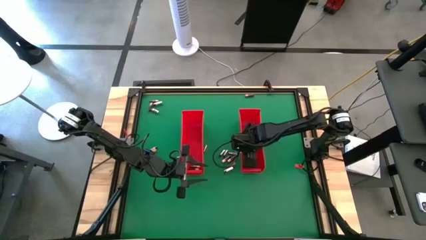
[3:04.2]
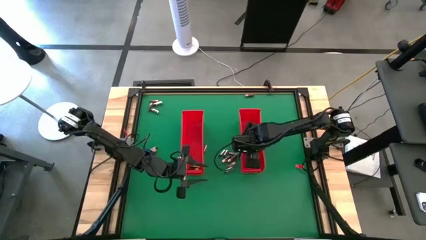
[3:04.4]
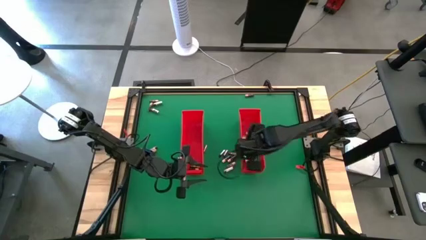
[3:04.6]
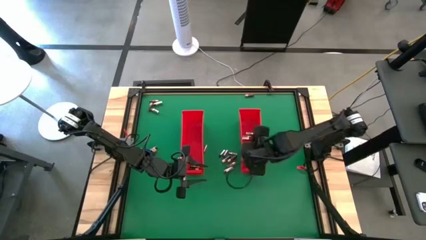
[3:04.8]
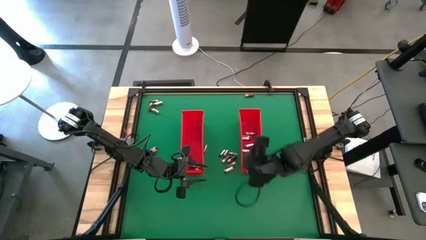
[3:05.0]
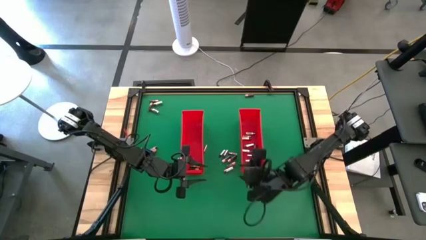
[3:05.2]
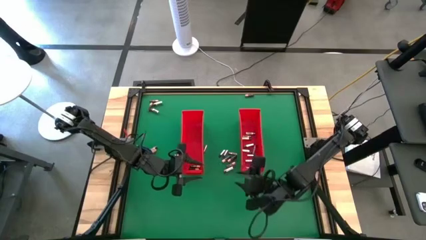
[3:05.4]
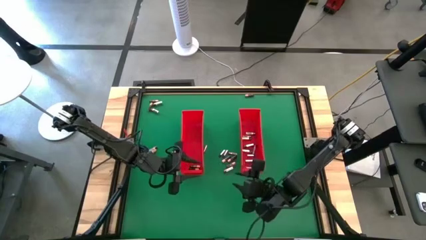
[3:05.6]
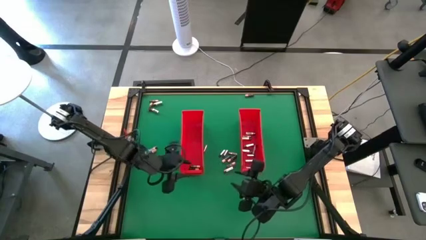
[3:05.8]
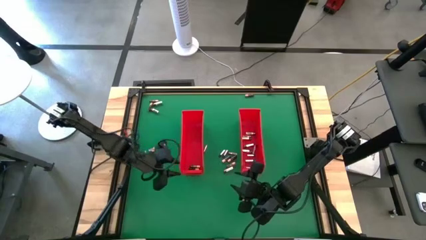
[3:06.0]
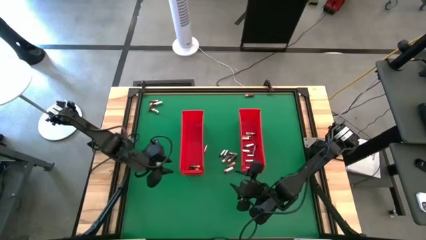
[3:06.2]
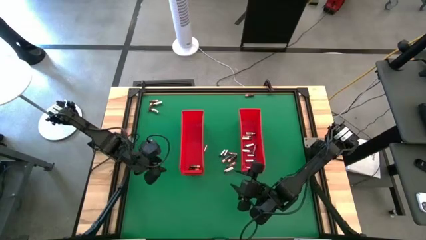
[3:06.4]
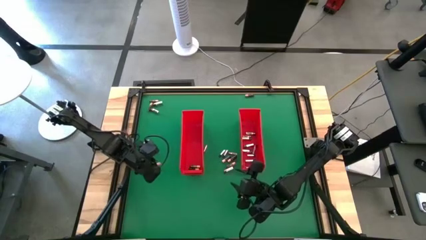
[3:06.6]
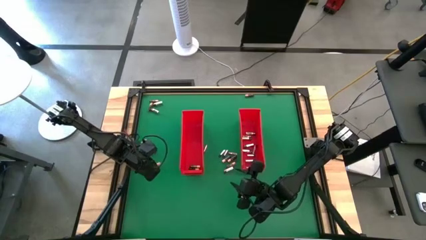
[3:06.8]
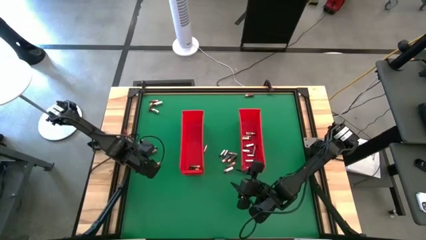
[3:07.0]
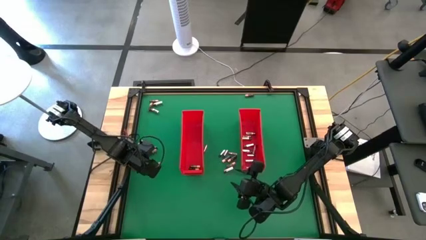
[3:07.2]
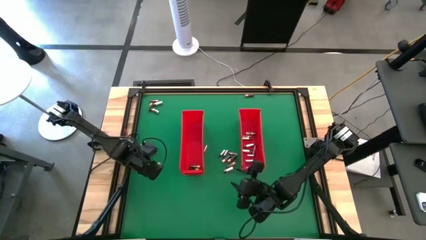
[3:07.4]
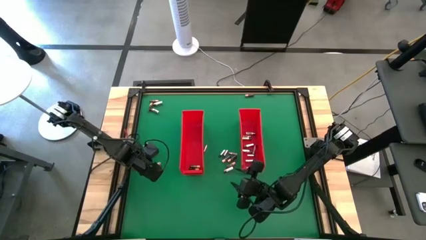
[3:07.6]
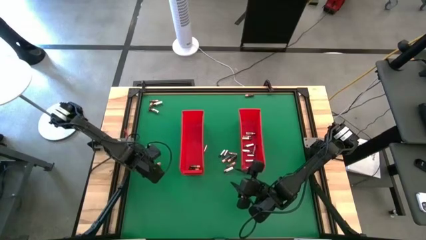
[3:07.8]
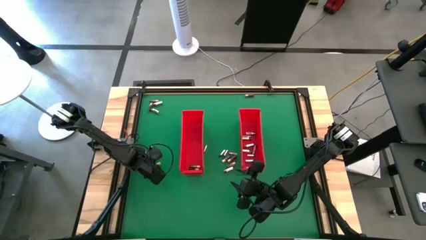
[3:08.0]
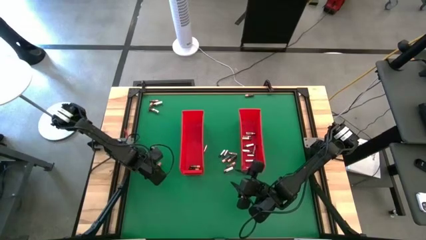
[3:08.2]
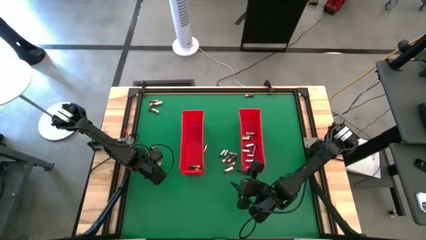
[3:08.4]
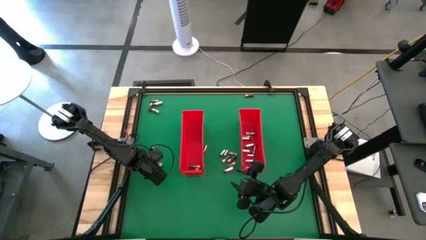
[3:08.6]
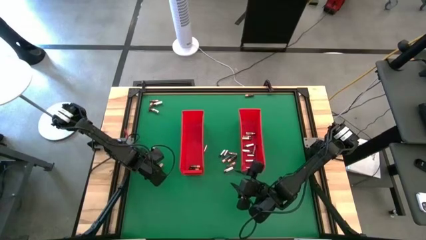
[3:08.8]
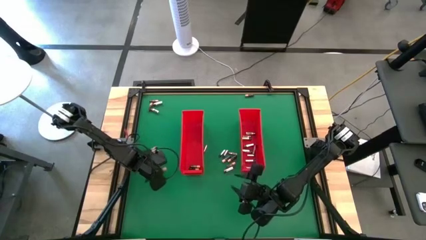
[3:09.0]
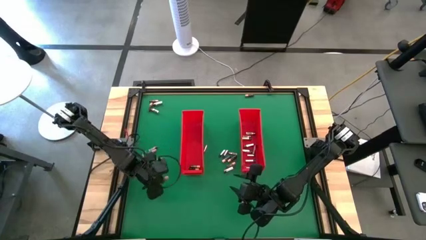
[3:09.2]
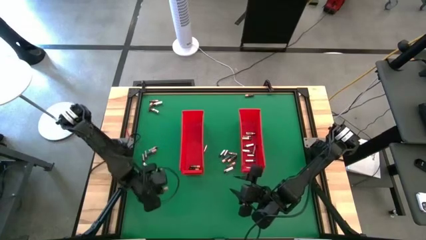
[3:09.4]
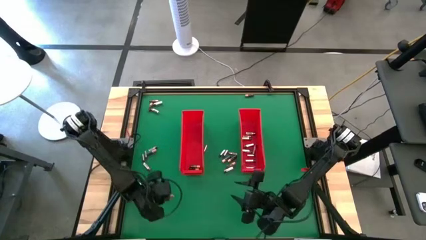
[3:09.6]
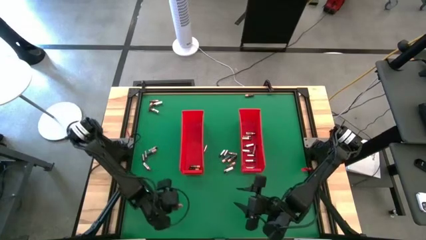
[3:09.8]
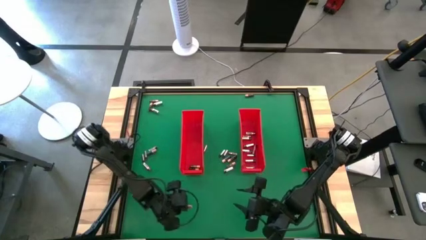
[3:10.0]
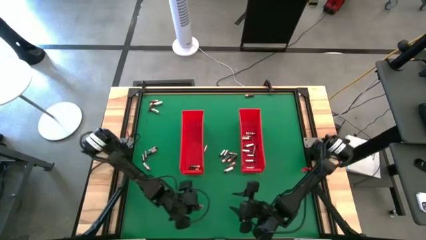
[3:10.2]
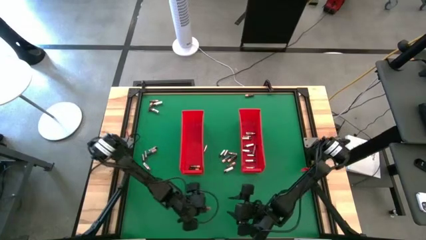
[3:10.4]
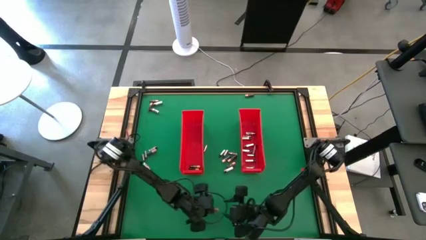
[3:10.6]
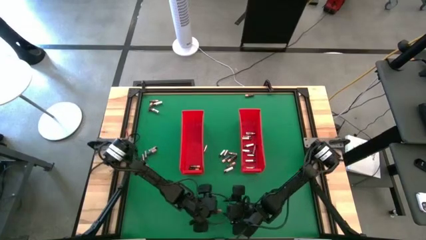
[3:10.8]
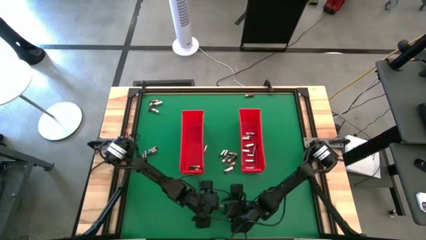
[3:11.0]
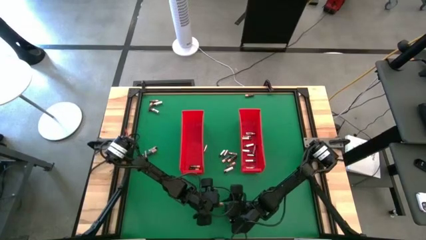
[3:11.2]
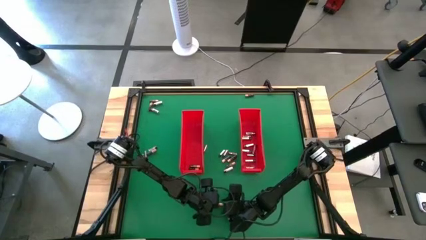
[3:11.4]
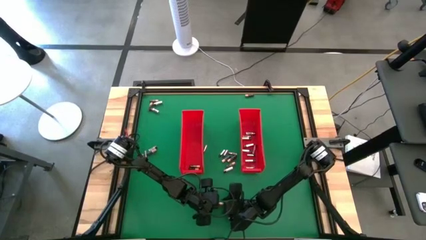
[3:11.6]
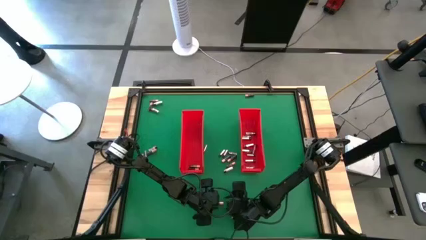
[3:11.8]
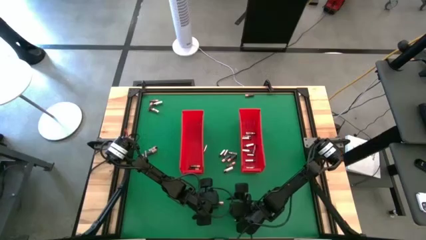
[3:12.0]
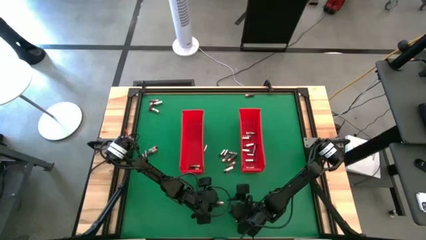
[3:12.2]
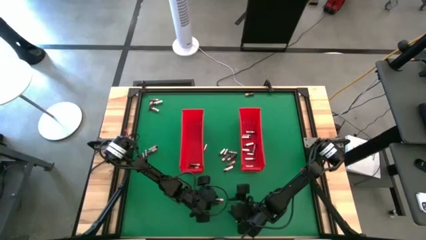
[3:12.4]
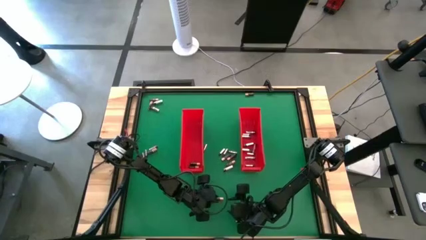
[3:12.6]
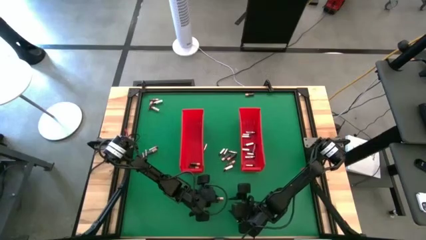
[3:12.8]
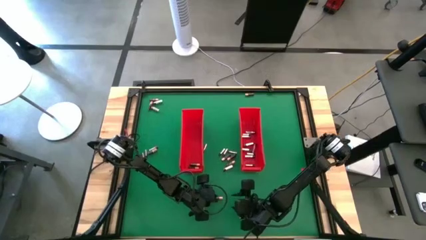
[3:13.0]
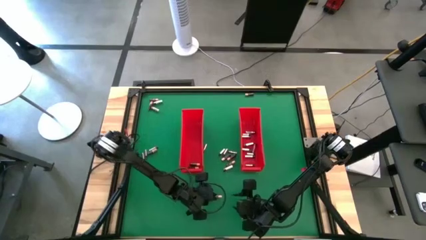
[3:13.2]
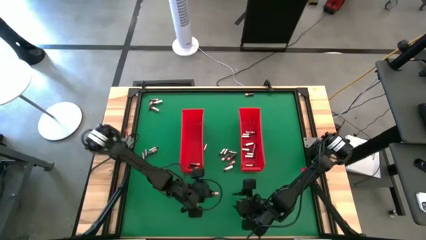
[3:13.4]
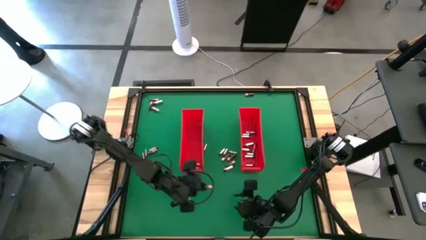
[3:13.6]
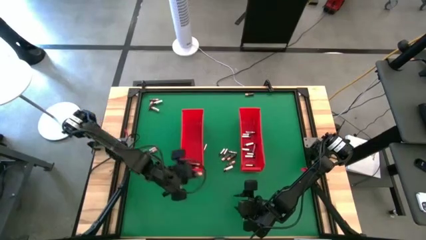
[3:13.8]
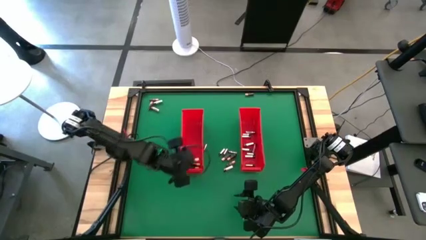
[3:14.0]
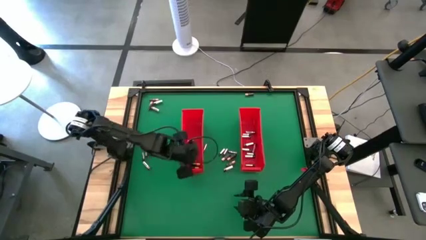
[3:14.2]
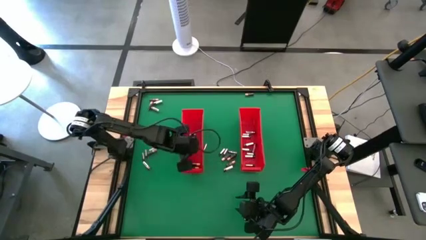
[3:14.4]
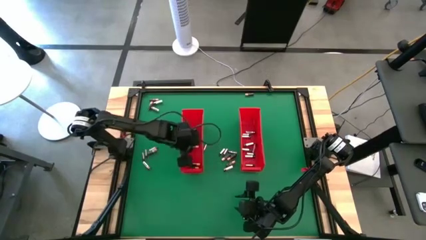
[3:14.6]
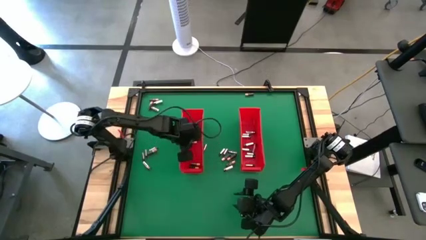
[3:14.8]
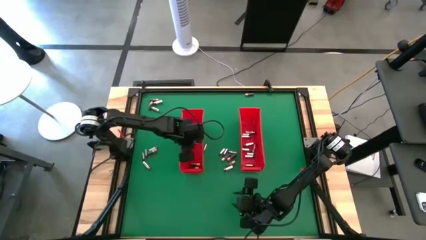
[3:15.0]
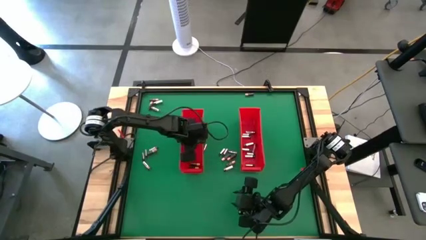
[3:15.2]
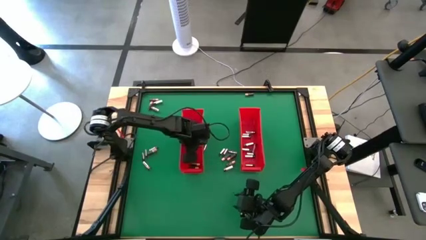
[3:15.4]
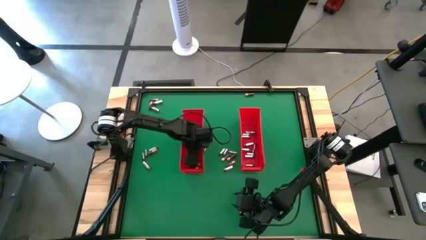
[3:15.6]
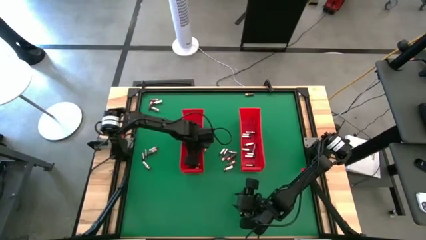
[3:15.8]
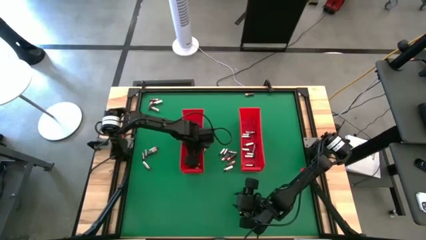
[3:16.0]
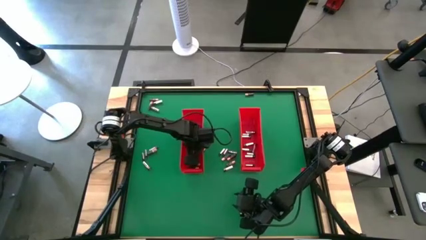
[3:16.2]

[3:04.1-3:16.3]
Task: Sort batteries
Put the brown battery into the left red bin

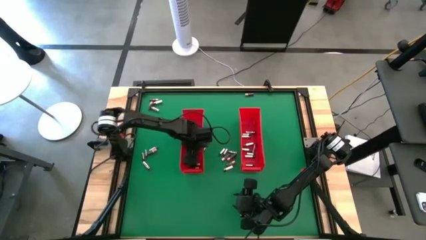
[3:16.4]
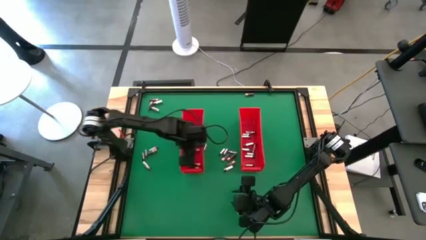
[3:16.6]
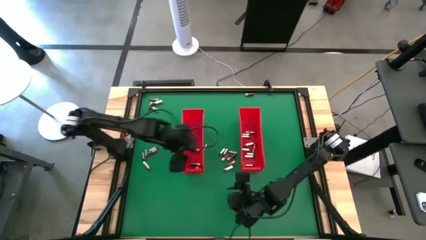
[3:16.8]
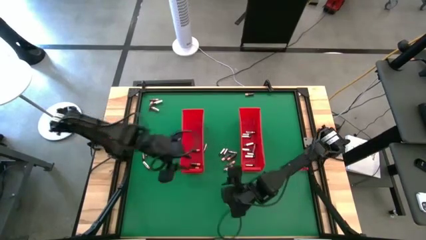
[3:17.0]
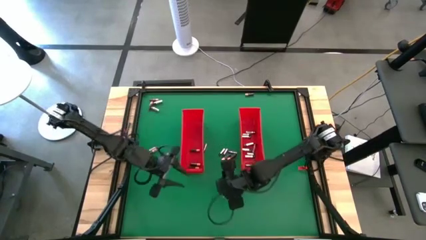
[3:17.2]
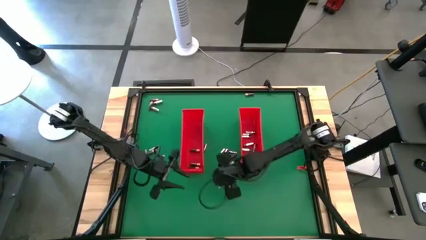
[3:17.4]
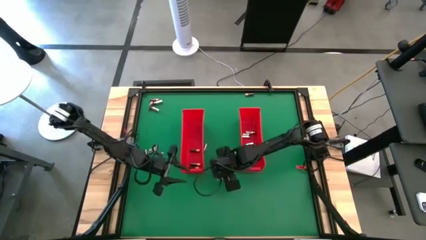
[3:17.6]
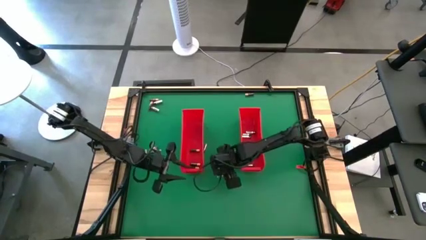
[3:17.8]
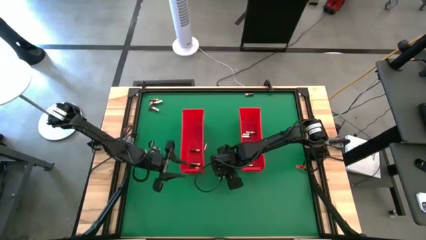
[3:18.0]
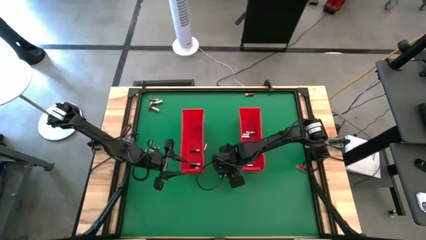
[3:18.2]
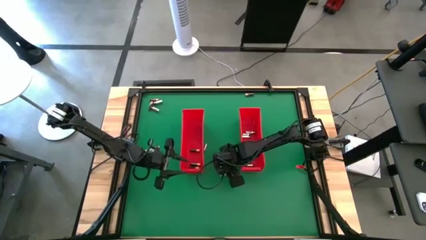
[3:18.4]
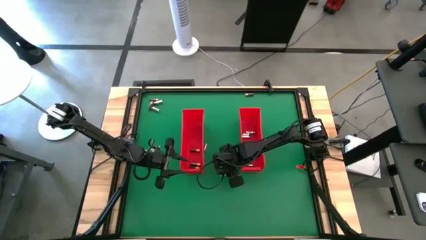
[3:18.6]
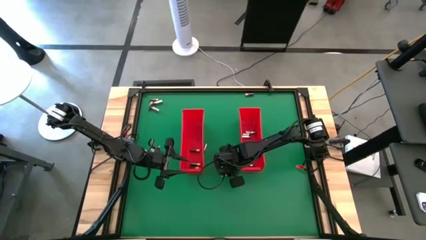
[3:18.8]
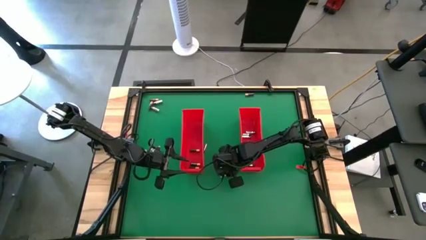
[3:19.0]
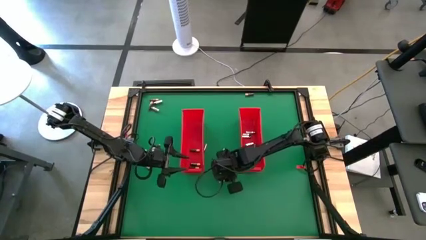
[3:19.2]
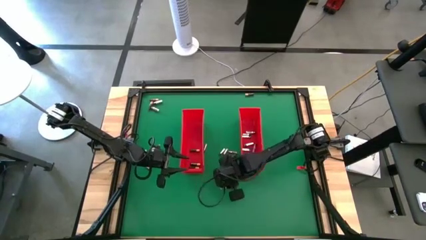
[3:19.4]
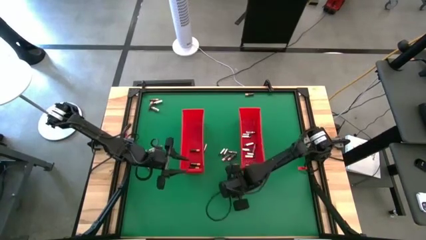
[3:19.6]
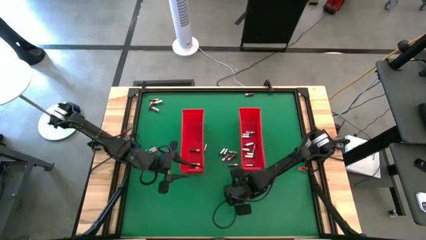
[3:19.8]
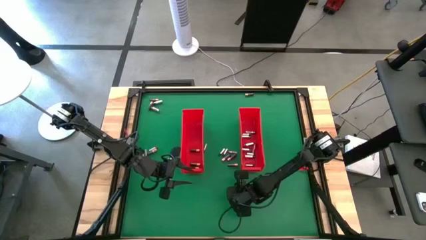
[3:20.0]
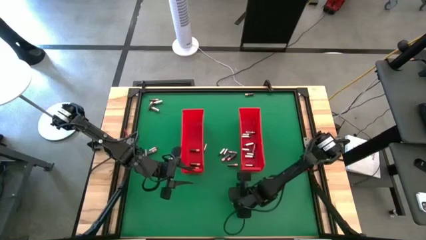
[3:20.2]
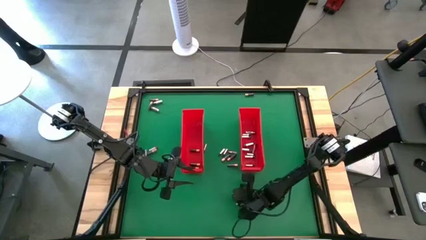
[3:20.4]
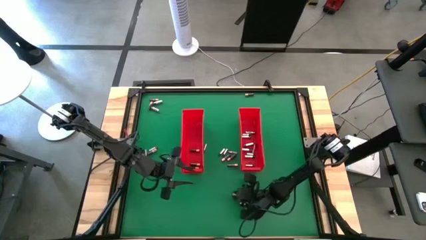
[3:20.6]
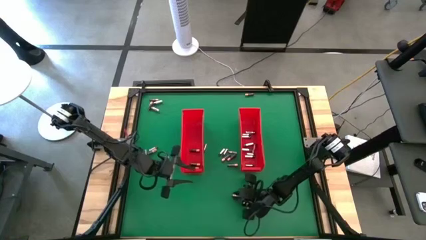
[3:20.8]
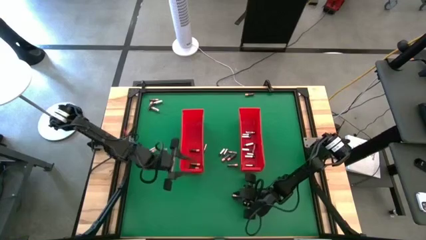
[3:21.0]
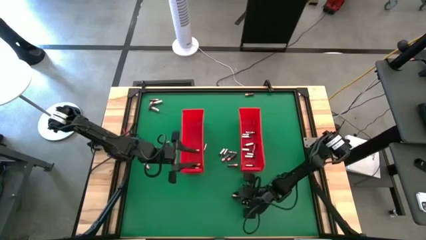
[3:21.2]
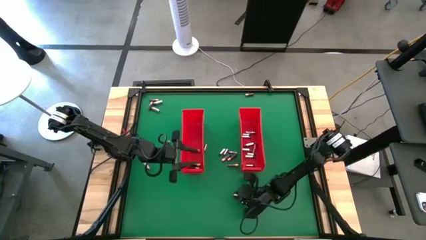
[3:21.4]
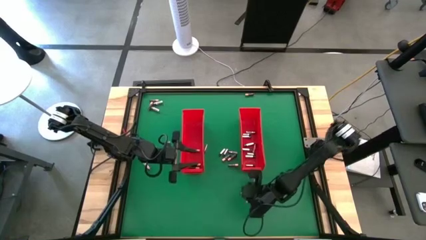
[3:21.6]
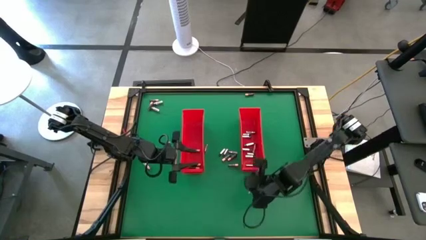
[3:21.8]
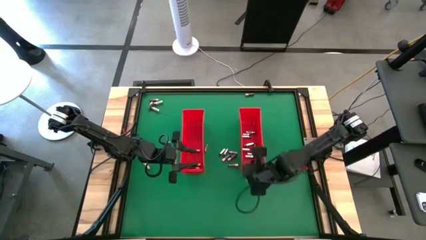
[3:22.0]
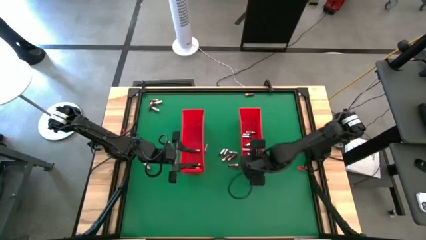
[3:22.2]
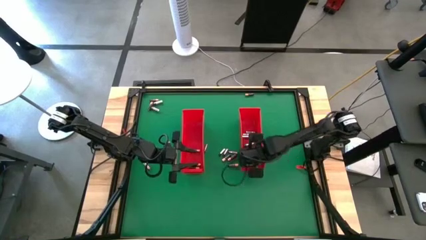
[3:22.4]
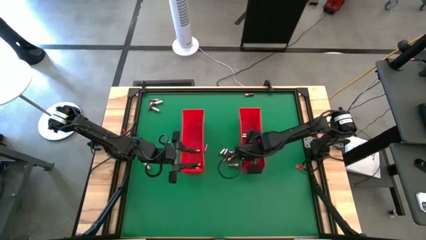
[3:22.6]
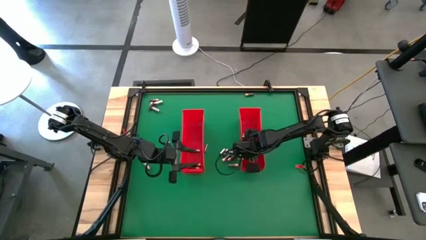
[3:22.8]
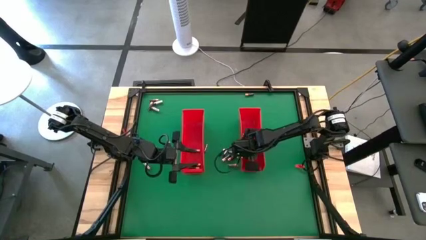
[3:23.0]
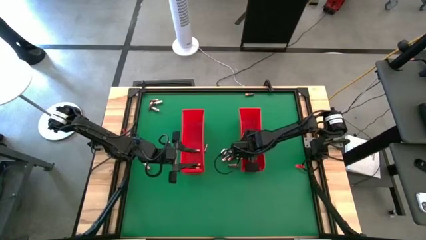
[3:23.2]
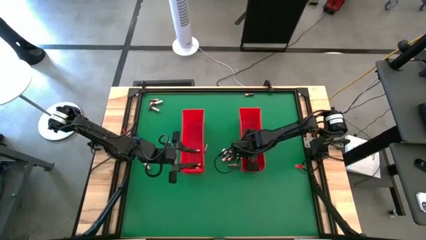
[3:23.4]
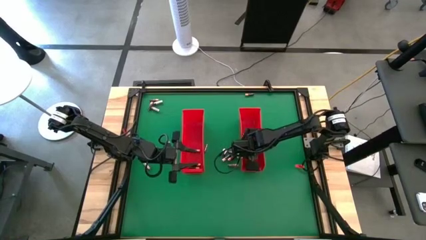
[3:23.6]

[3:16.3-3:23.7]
Put the silver battery into the right red bin
